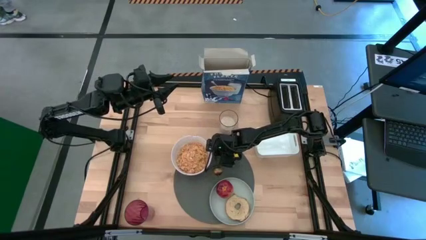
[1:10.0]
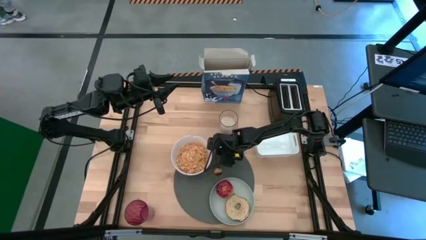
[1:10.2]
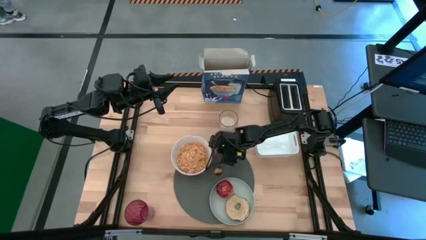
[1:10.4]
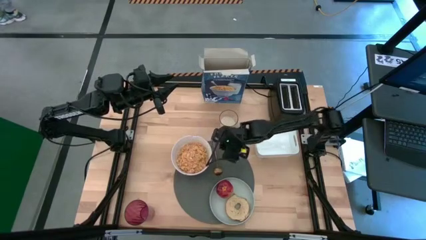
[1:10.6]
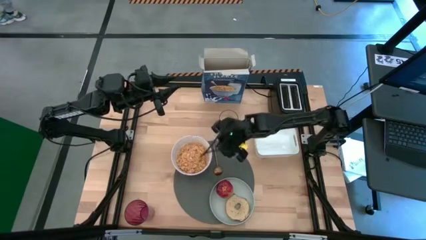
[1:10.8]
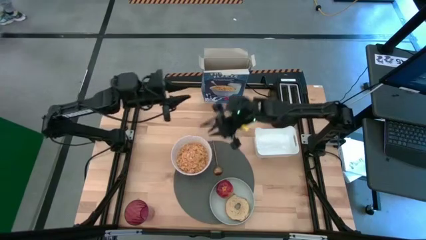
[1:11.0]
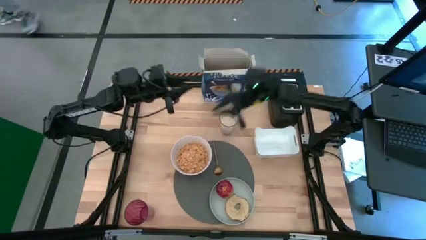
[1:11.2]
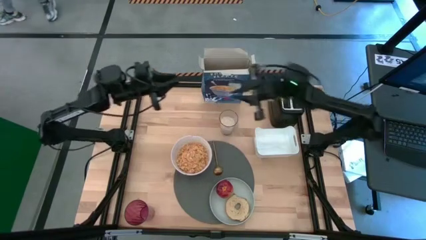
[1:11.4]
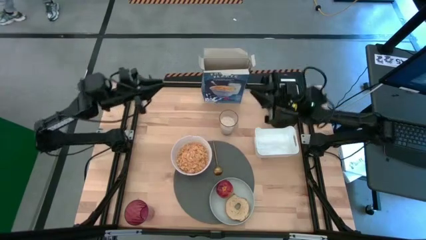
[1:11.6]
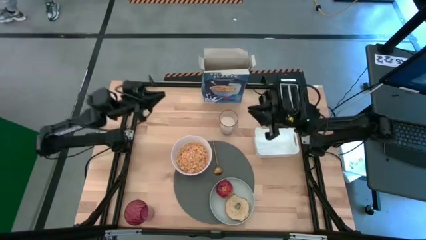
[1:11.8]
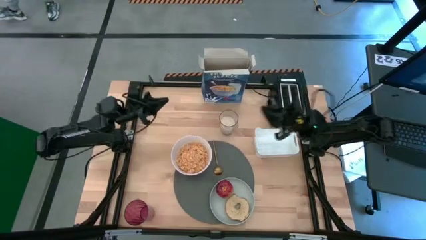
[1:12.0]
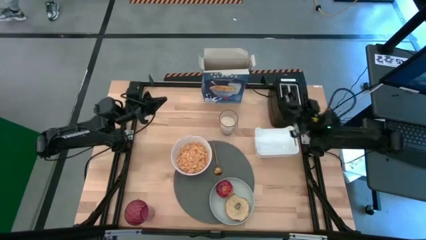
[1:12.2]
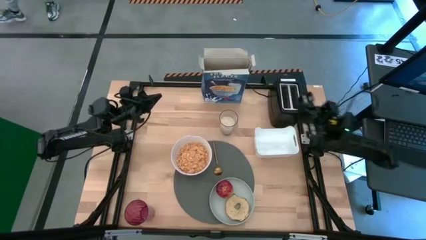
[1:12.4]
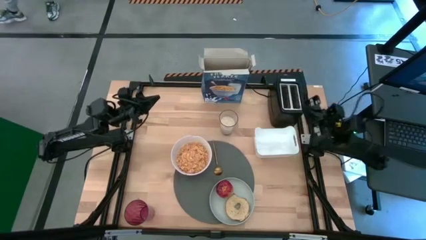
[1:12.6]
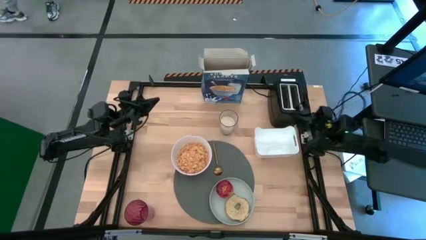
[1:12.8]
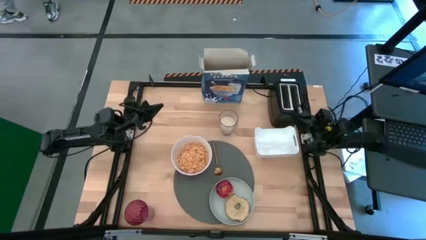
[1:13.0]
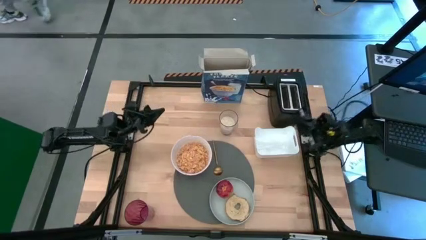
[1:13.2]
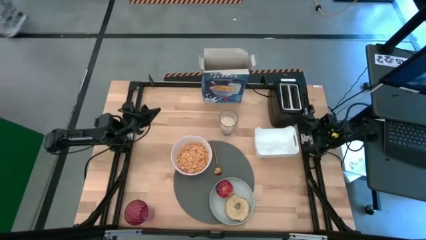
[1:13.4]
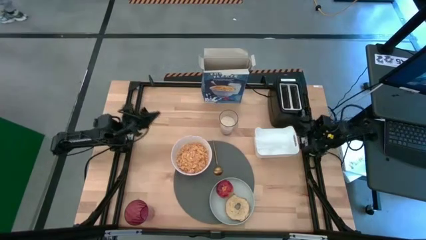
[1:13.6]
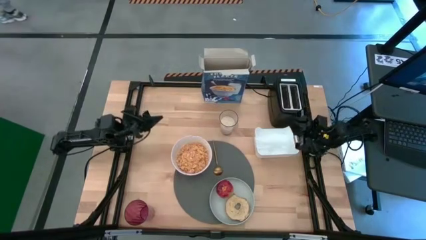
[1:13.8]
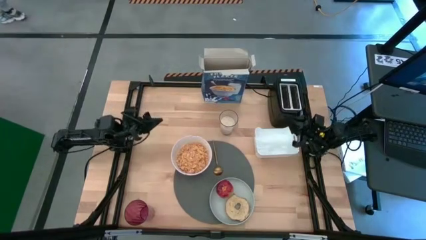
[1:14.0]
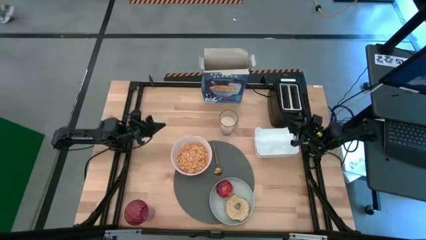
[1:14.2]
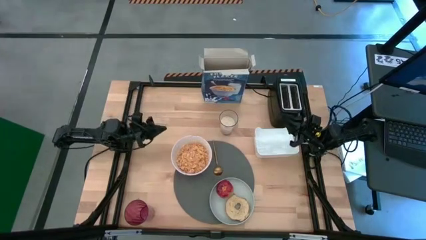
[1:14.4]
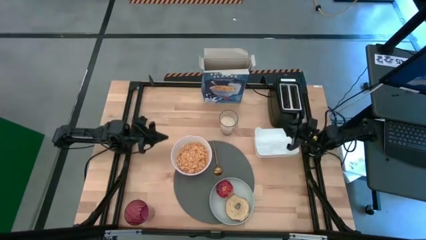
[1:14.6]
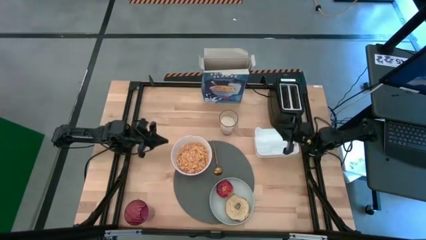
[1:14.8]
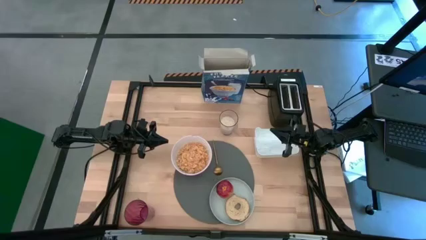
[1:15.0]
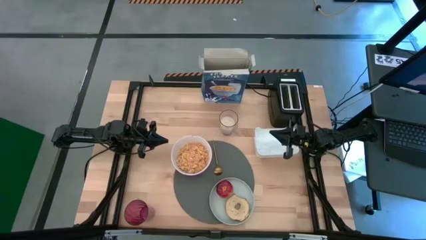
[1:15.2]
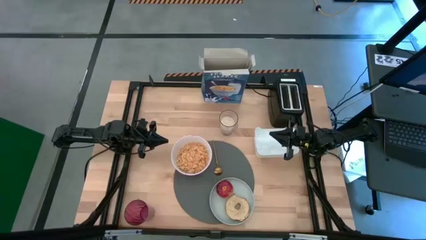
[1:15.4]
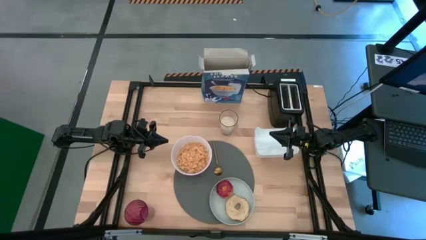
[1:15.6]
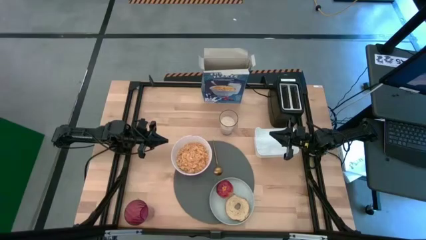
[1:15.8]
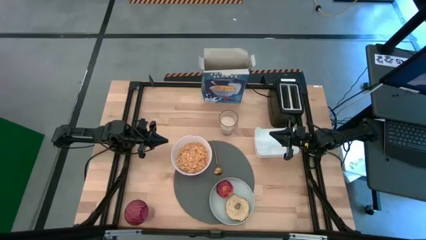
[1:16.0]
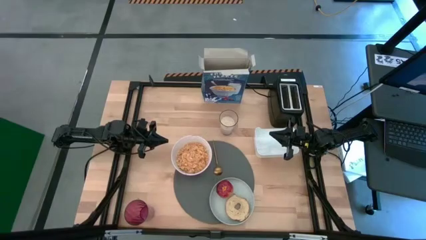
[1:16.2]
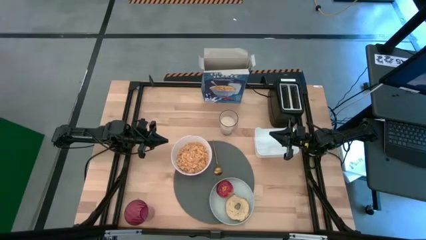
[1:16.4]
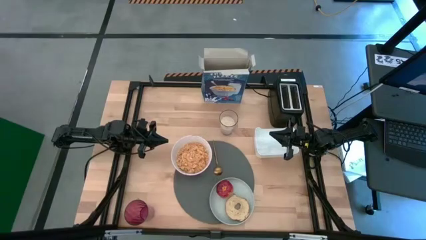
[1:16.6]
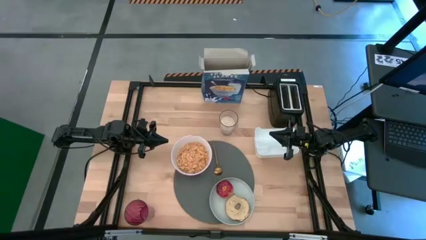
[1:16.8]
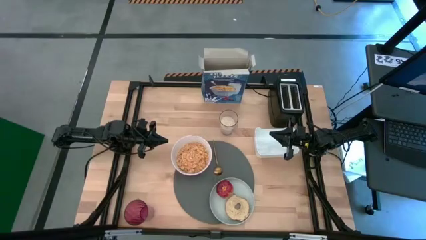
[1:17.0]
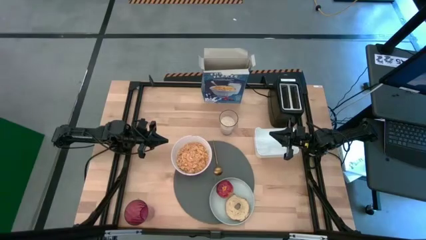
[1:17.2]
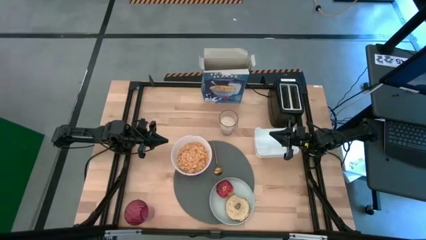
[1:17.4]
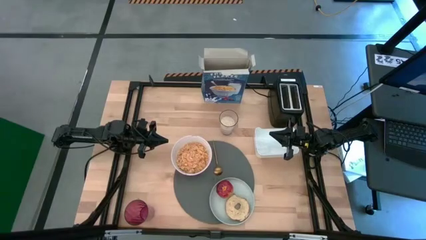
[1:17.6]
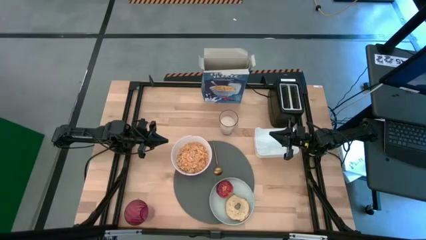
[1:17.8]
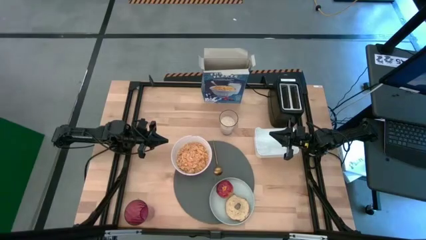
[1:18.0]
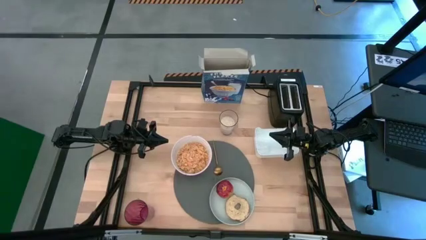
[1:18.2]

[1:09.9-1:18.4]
Task: Arrange a breakfast setting
Return to Home Position

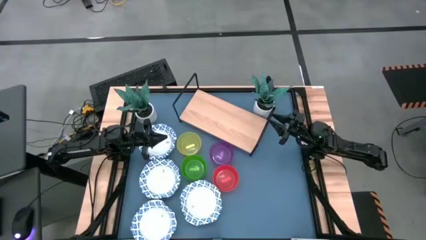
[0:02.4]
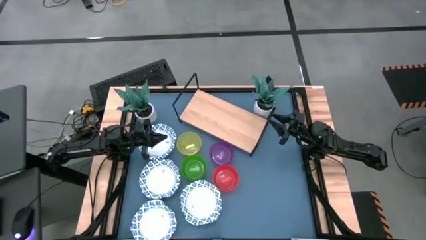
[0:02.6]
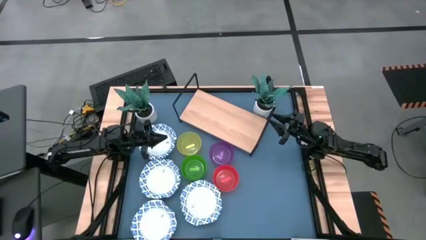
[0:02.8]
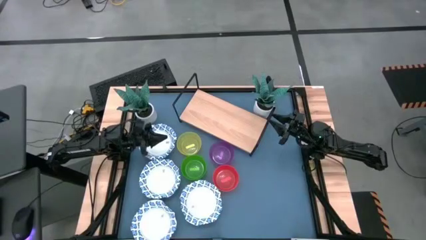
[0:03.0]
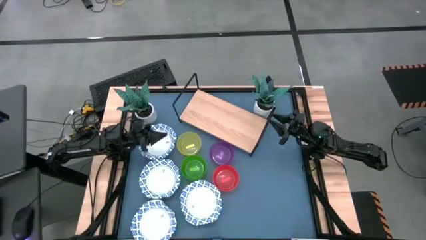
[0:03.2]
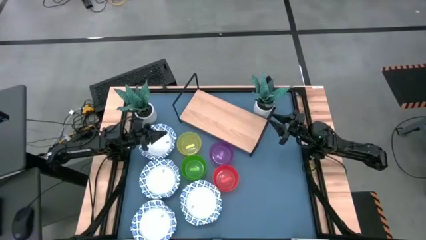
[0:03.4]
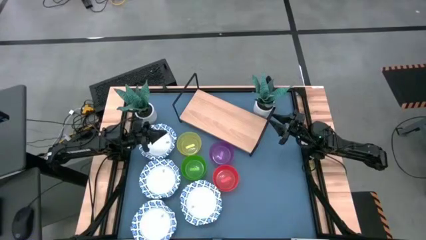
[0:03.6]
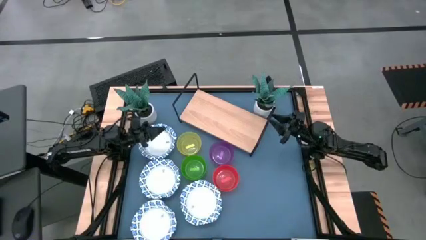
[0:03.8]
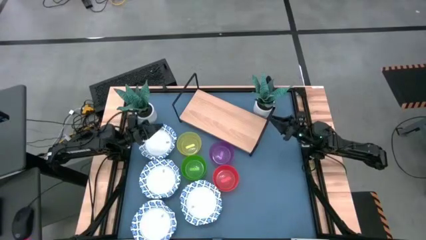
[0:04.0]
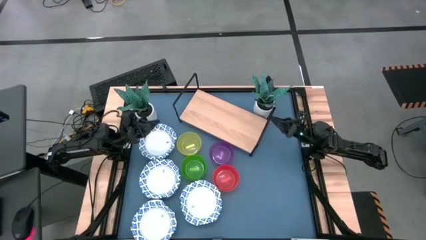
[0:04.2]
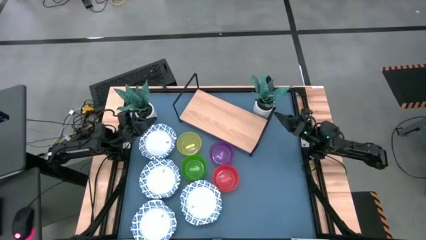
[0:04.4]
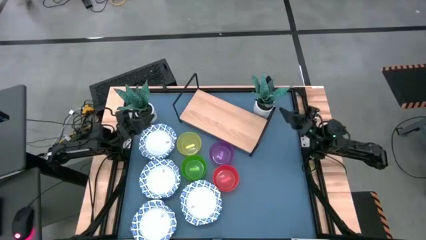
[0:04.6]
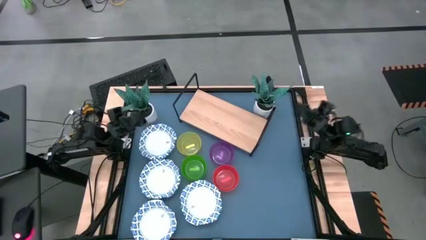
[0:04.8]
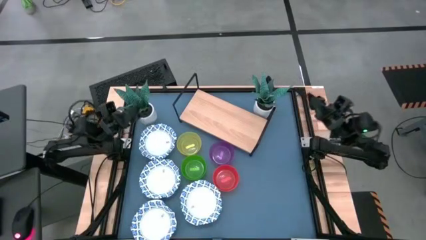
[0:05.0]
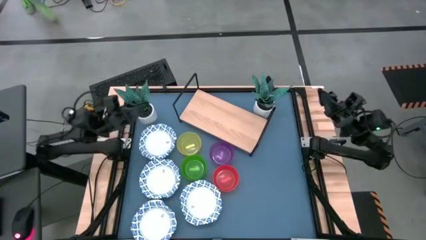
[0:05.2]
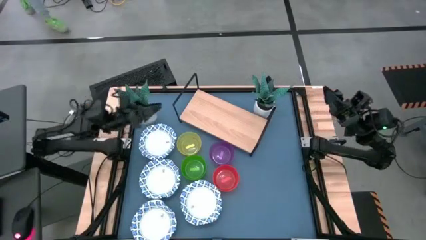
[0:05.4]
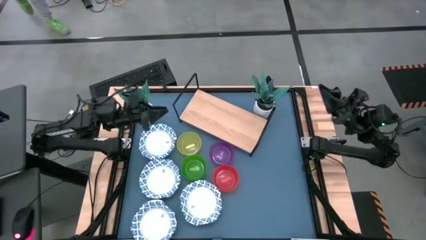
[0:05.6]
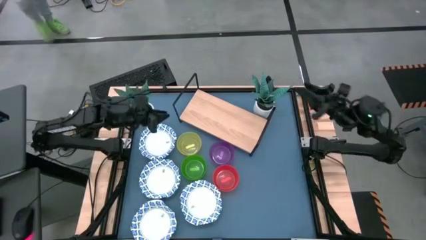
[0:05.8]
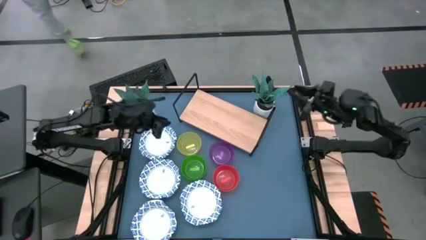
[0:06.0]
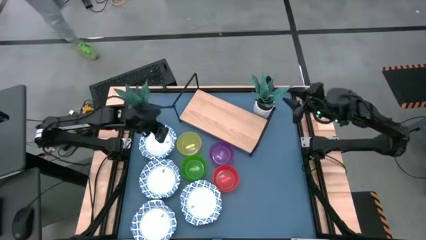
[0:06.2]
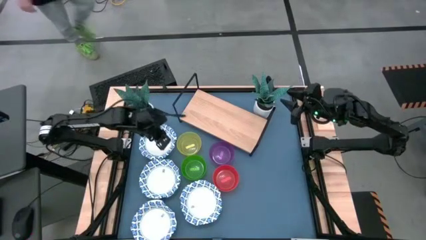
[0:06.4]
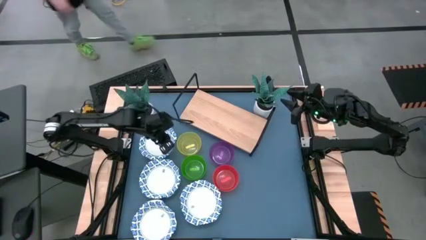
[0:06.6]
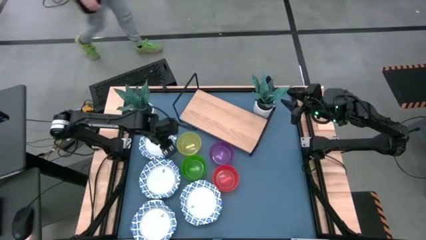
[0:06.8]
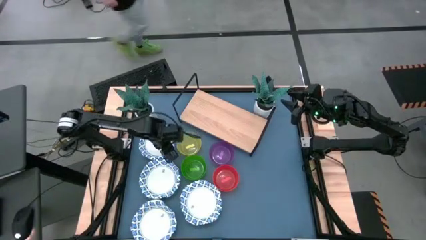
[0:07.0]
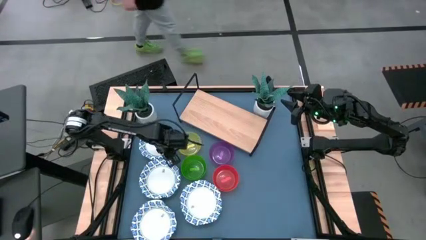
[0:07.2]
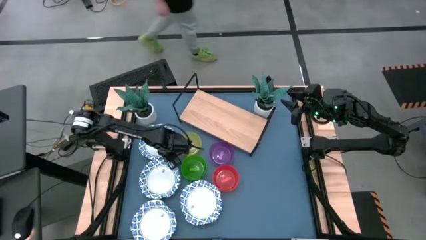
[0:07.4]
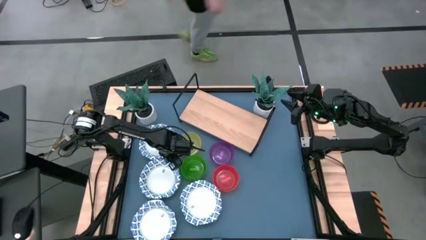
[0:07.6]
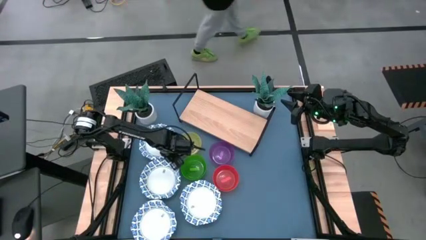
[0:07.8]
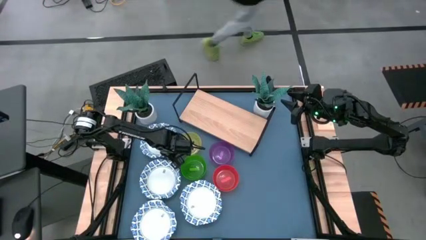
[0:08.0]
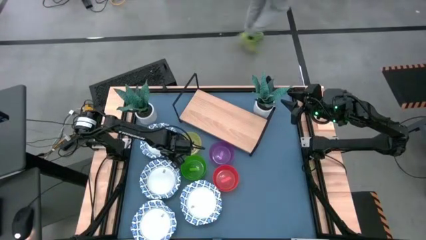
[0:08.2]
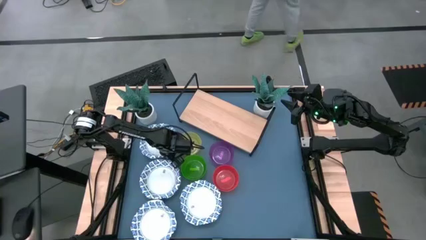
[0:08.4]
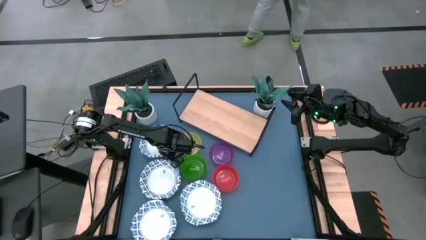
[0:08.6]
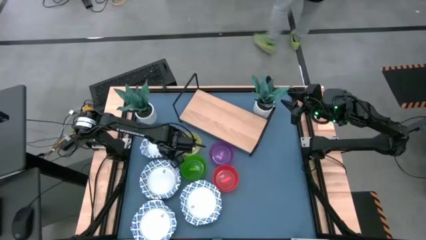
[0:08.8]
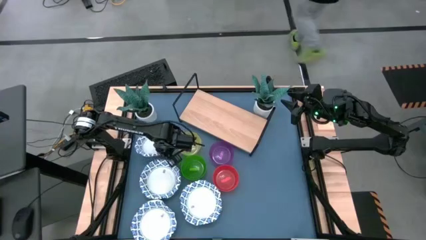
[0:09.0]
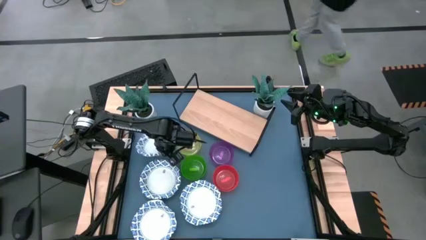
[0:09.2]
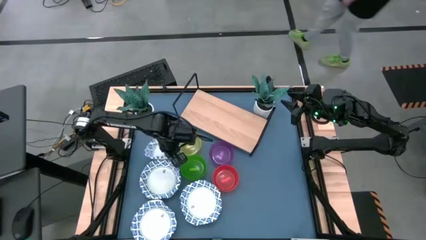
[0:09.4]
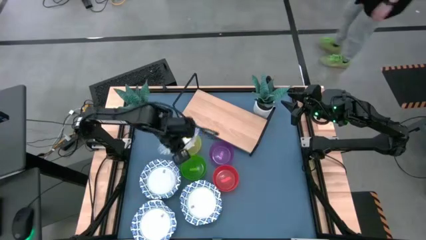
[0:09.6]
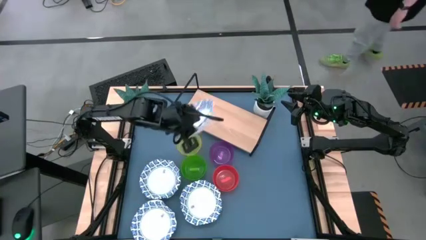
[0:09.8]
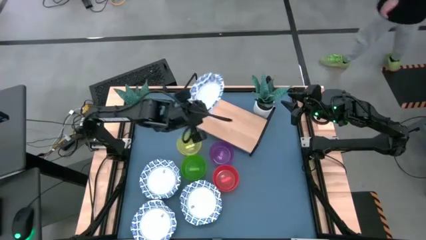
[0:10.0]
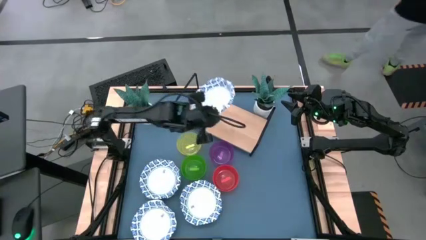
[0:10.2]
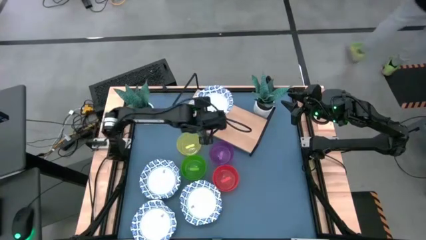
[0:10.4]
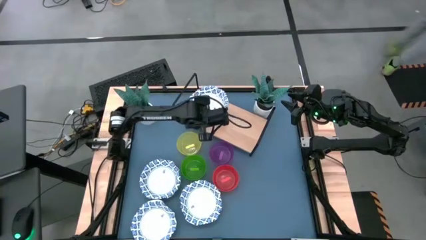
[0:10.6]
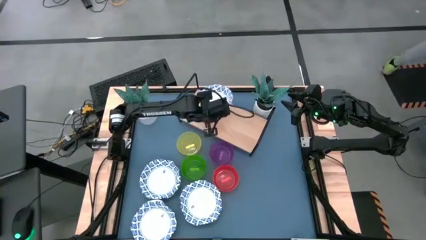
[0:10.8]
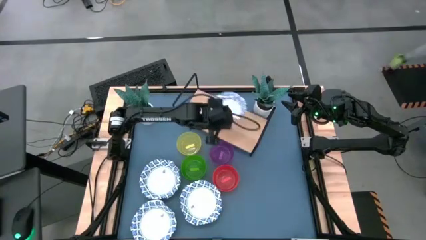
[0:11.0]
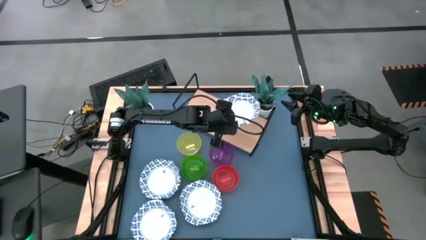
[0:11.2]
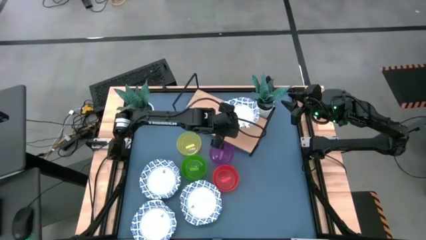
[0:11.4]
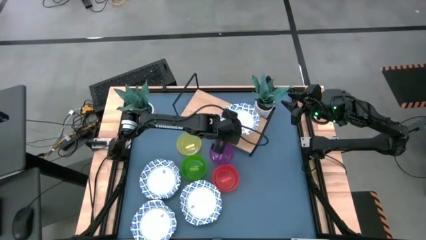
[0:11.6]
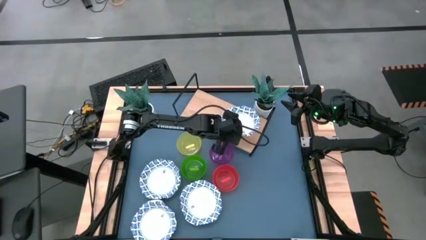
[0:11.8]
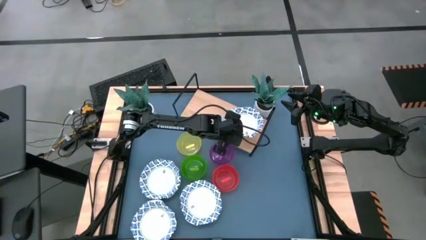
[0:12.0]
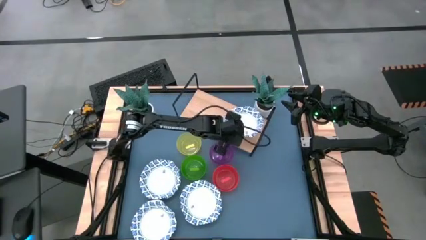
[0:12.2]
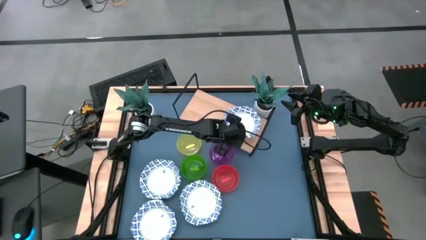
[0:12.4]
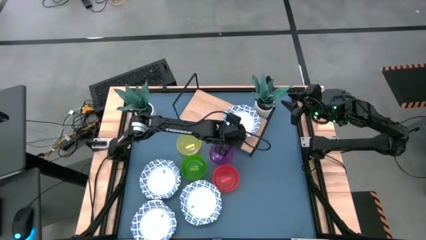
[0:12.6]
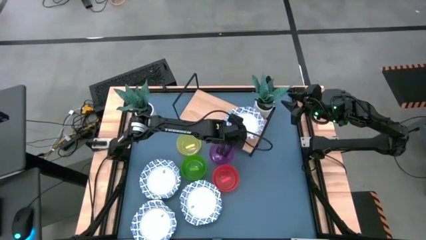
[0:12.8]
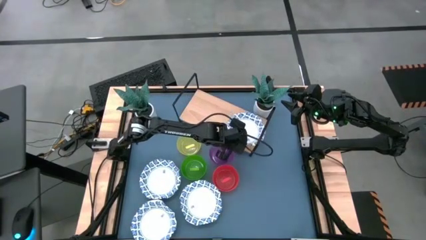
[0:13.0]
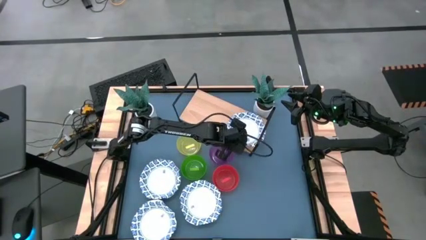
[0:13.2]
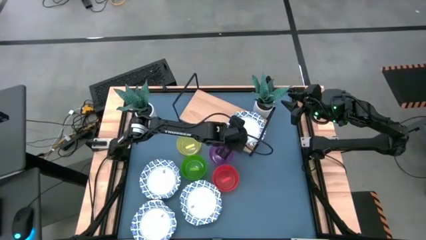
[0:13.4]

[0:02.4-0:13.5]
Task: Place and stack bowls onto a shelf
Put the blue pattern plate on the shelf
